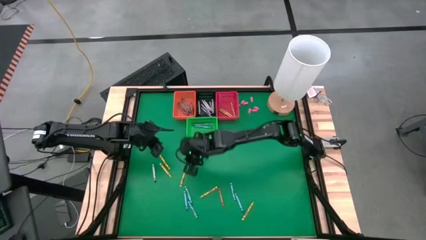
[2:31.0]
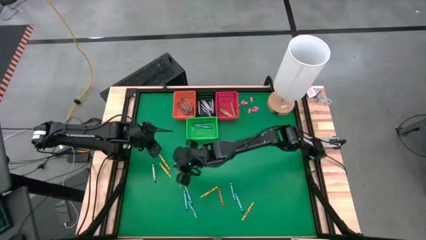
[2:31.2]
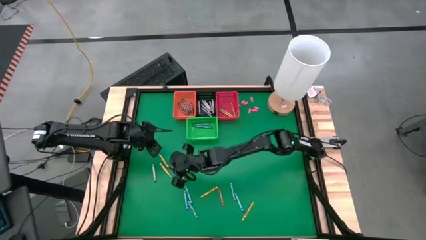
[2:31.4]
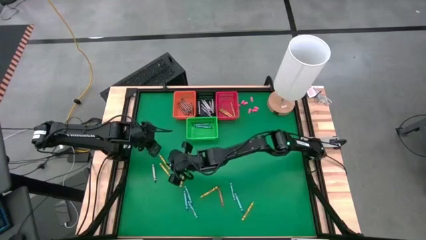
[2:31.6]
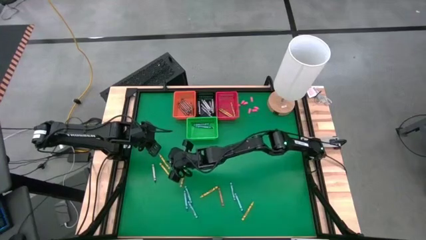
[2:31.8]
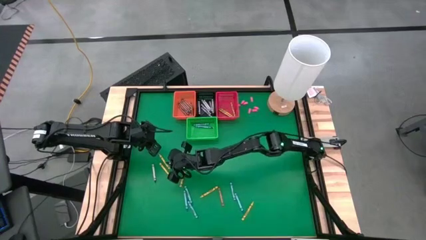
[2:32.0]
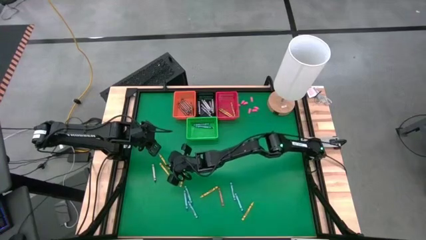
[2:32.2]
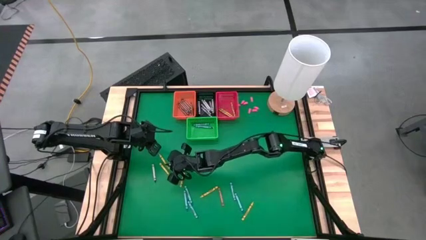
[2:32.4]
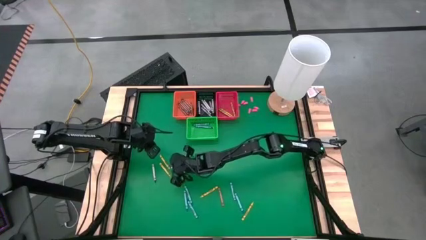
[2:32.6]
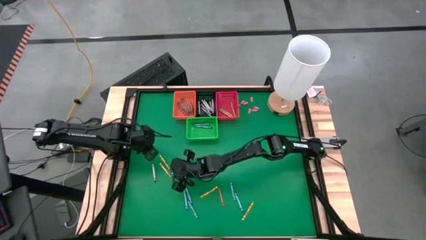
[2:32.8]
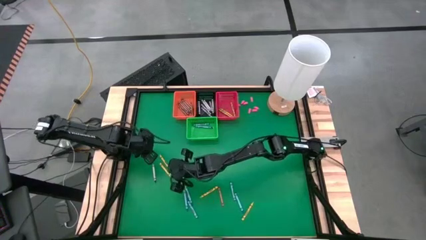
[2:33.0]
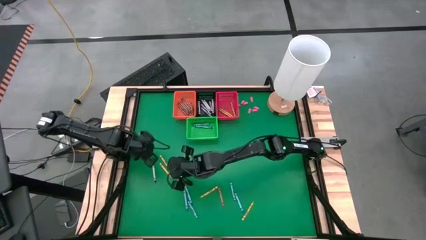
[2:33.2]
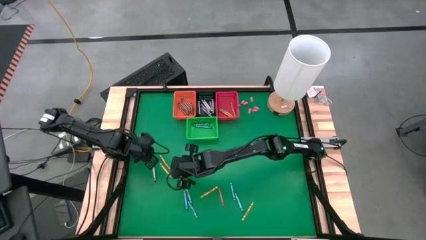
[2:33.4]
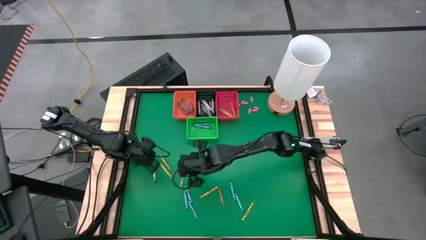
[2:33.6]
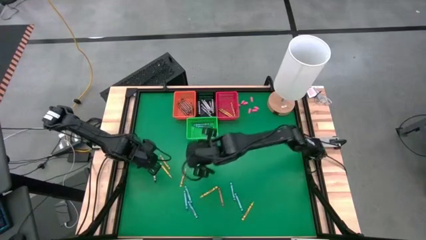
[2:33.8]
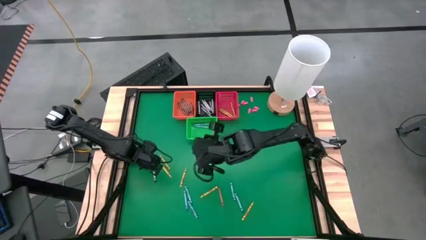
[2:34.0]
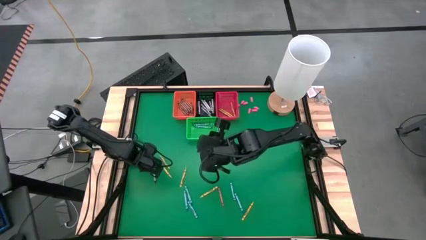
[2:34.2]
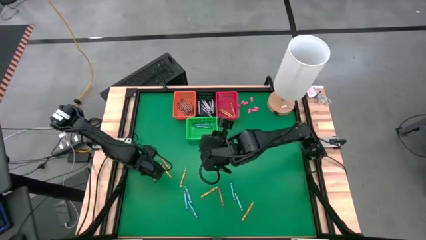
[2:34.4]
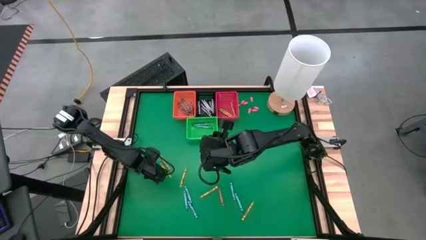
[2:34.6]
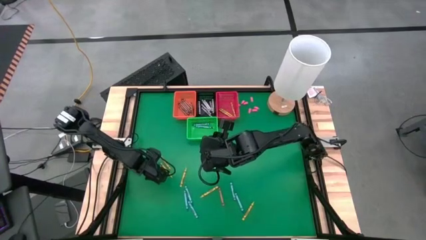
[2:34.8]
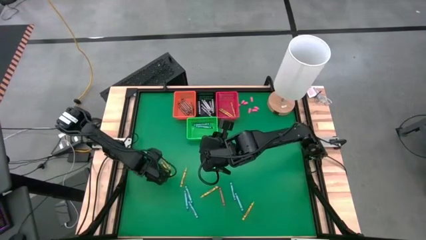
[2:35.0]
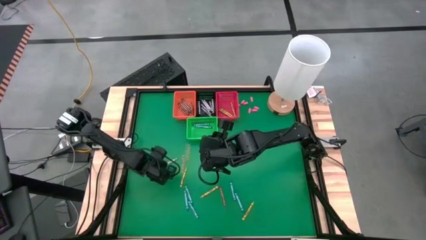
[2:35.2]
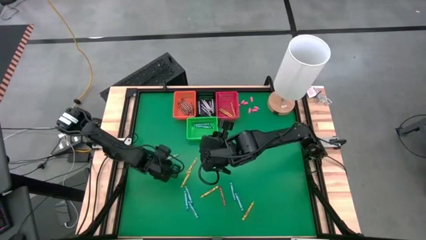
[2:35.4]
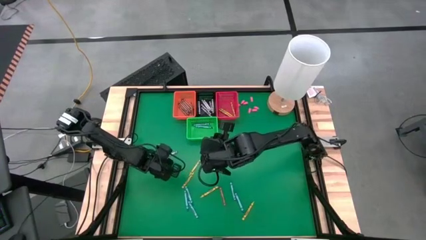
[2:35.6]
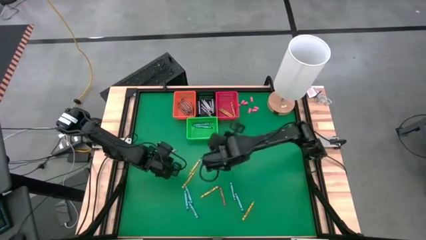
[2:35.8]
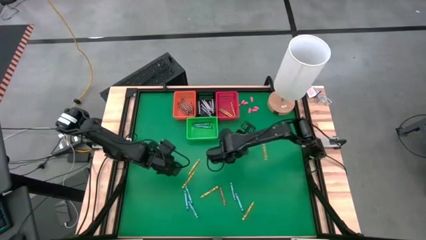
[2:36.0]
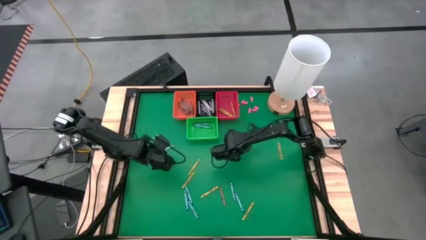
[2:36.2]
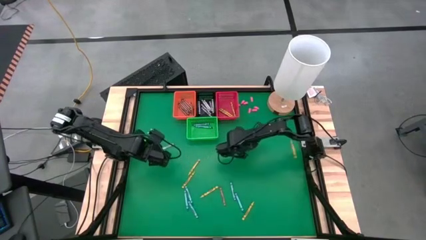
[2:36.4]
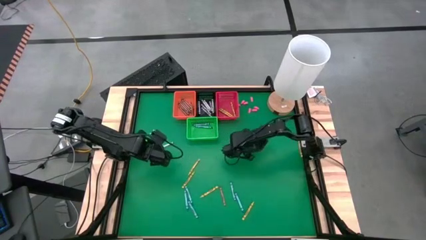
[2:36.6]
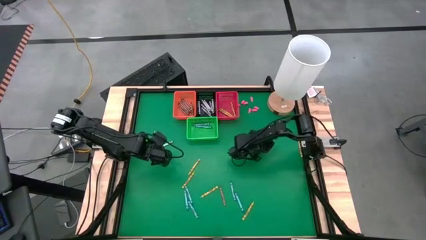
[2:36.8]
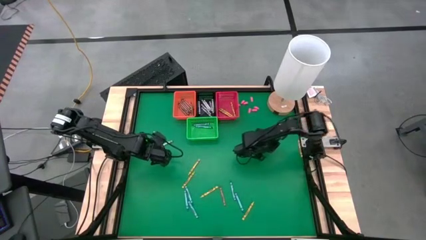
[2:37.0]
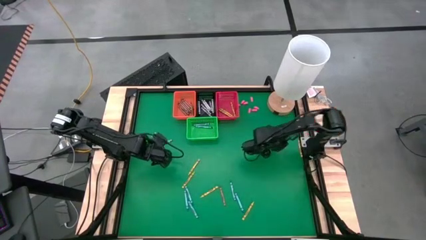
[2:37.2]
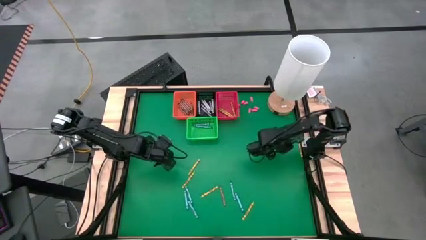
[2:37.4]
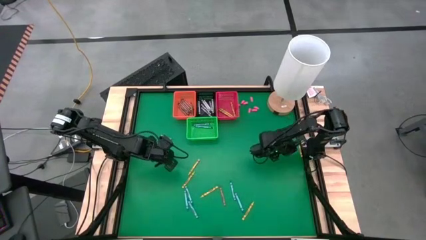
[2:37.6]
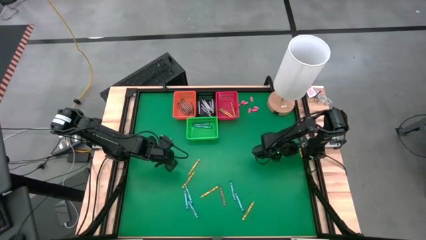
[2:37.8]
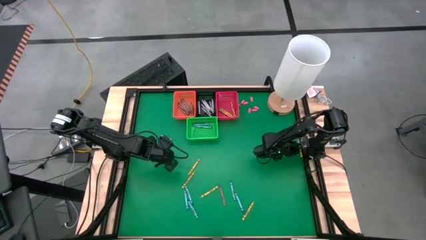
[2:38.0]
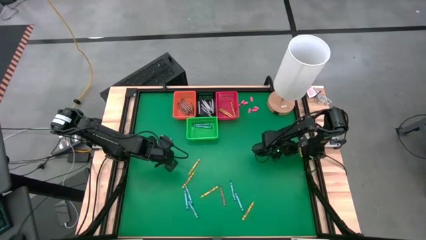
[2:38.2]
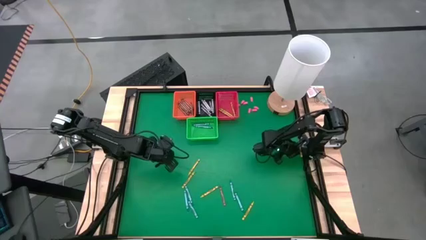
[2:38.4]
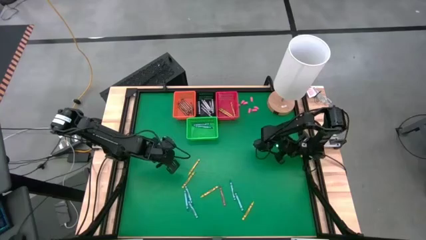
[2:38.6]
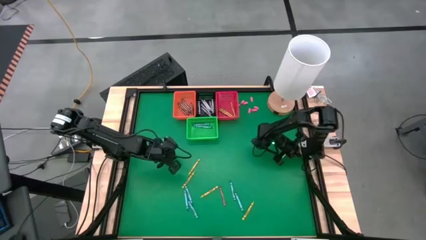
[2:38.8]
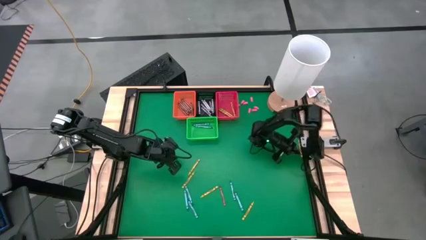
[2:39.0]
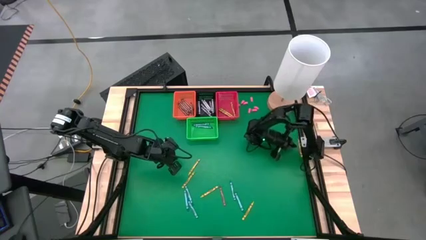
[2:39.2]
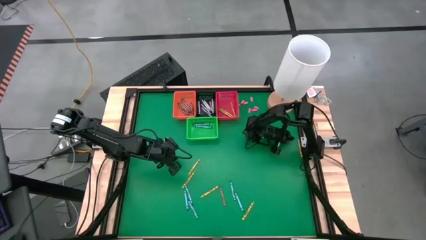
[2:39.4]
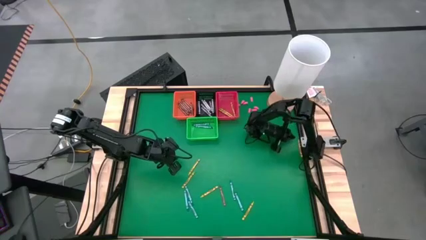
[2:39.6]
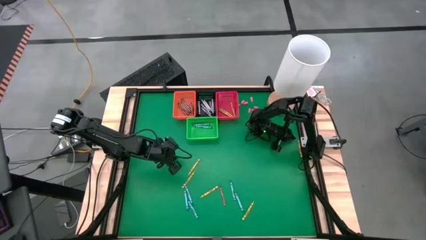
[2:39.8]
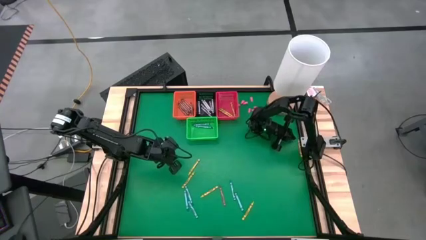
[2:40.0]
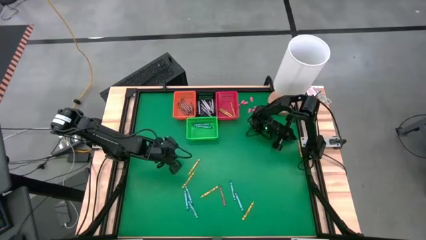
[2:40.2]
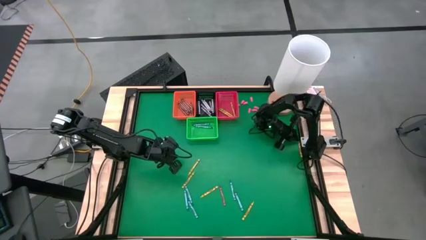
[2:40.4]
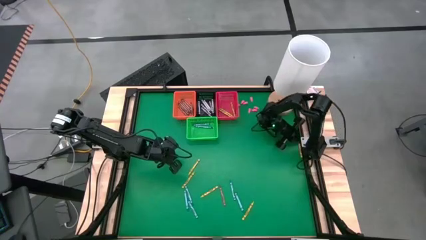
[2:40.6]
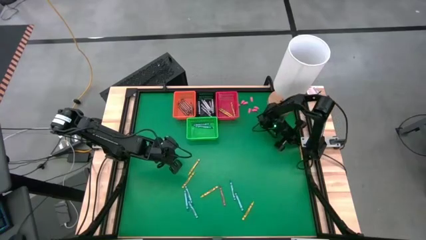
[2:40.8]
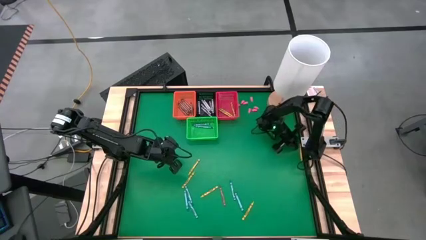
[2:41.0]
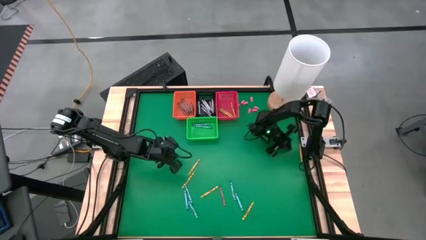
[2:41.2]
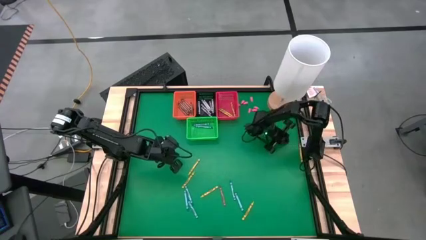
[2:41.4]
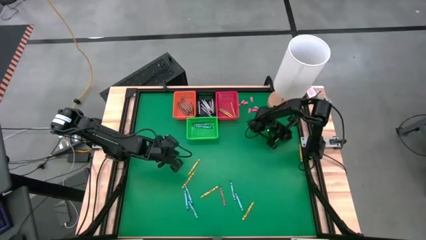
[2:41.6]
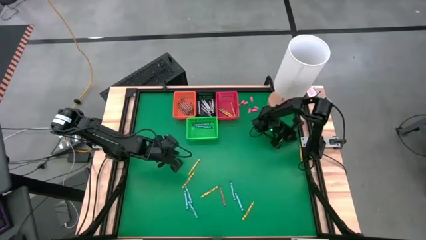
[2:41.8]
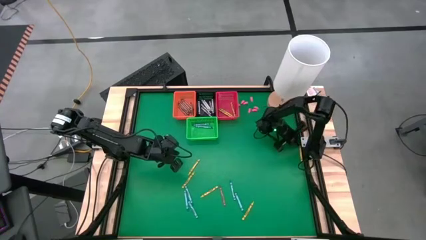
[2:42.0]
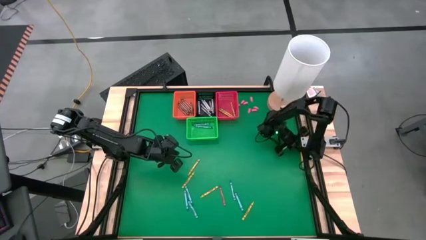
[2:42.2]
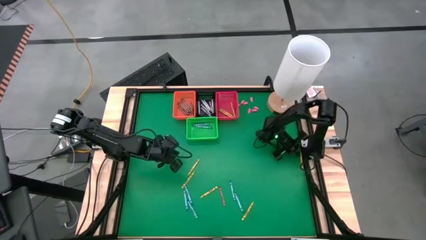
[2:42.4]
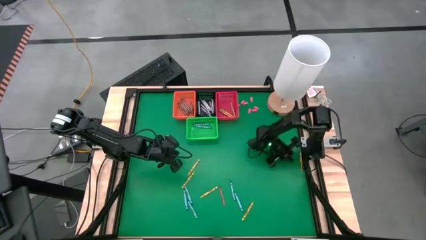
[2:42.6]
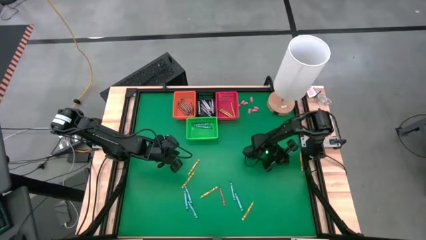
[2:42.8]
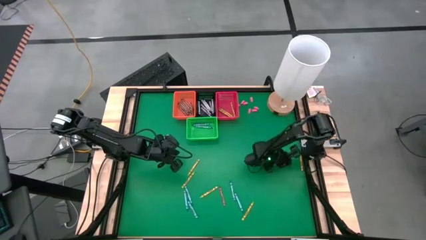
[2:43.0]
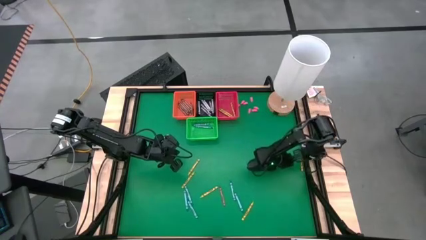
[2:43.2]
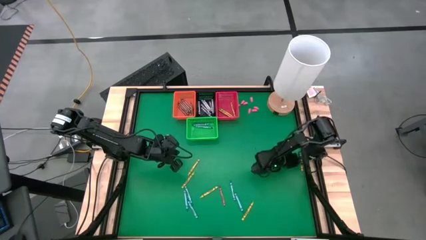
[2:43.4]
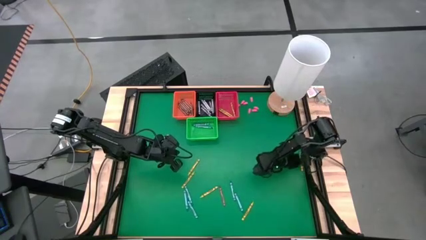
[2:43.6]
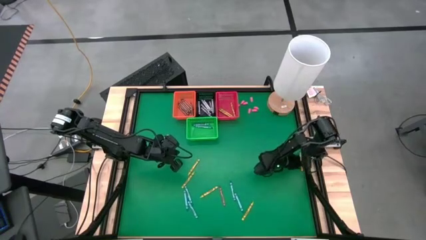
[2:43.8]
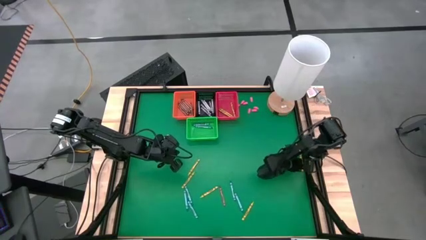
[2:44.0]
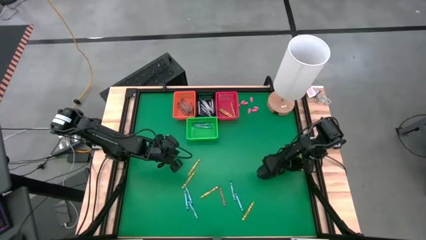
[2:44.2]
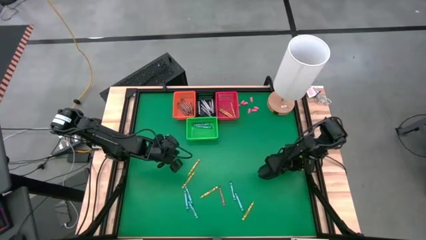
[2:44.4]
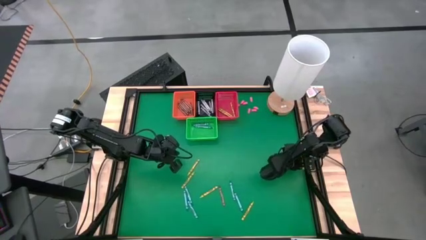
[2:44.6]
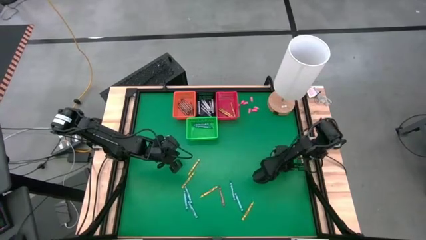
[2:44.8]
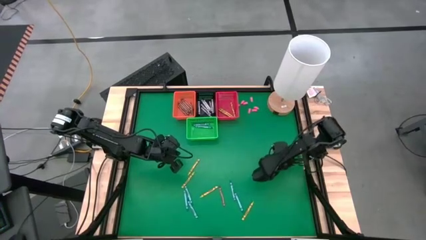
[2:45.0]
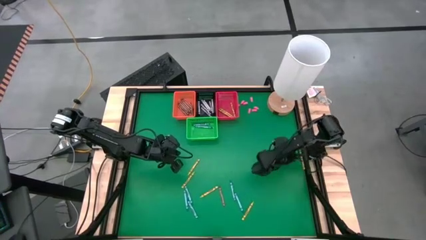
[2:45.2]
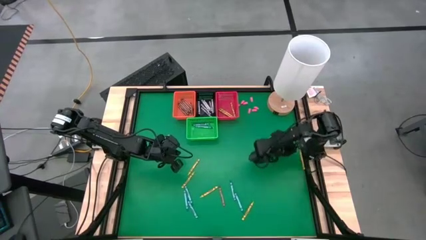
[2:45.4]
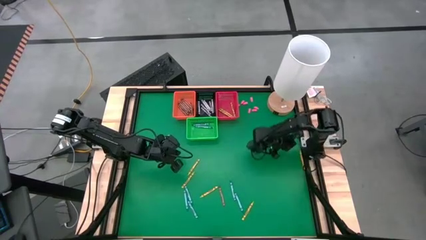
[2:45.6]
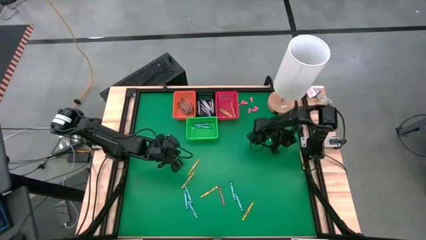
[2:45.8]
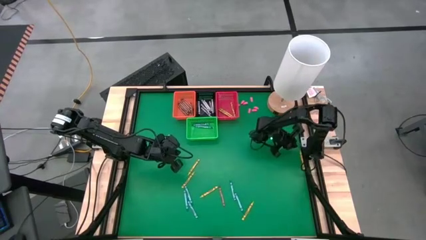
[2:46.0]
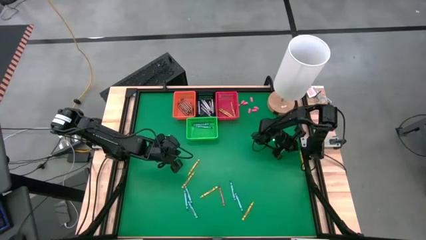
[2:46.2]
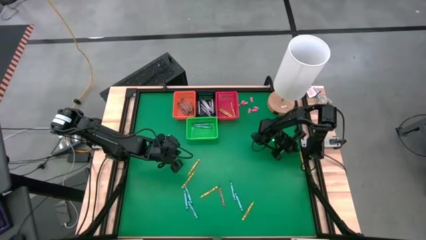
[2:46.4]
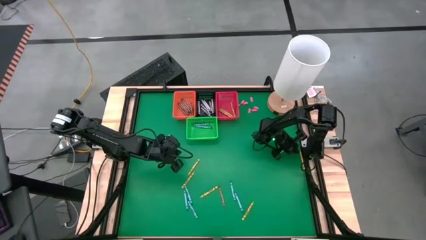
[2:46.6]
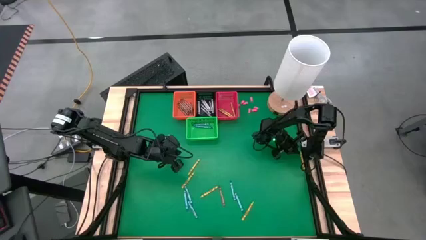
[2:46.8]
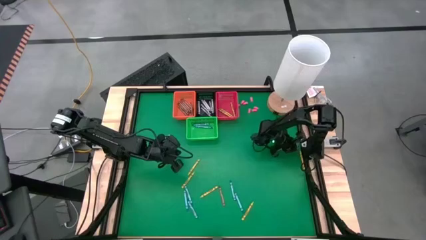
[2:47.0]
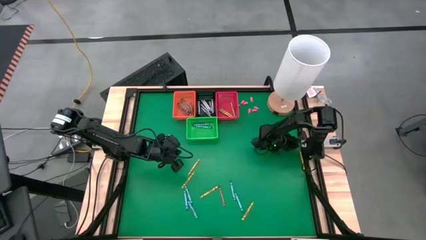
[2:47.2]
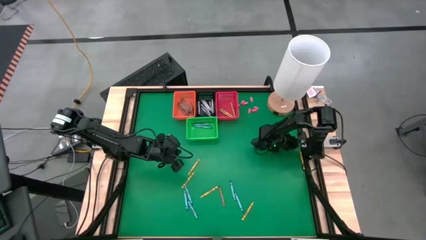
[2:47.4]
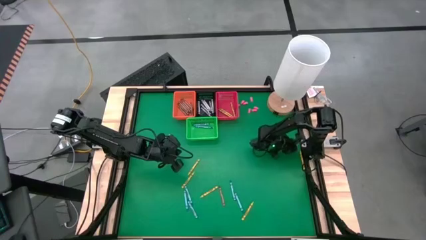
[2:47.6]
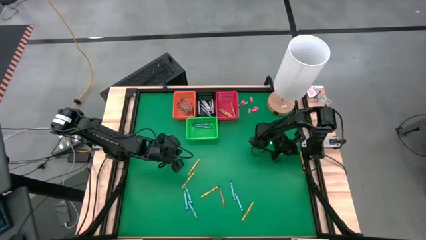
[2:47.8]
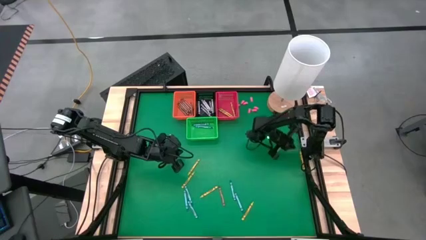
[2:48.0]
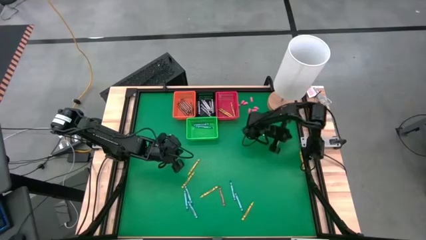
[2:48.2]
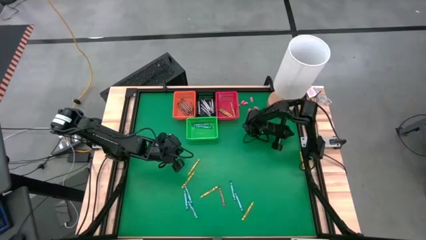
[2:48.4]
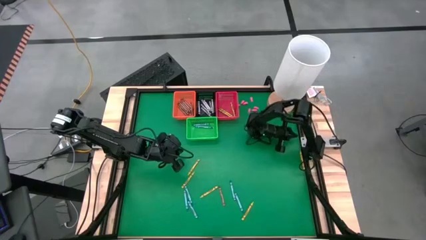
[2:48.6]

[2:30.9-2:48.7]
Task: Sort crayons
Put a black crayon in the black basket
